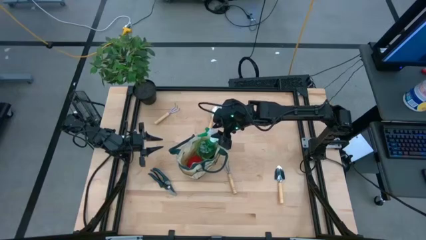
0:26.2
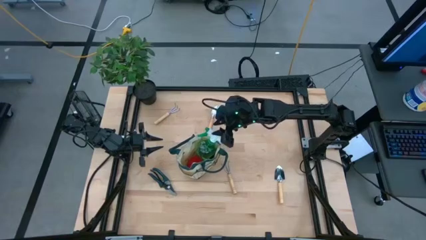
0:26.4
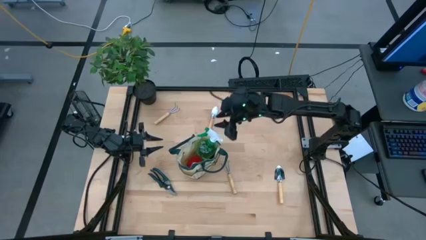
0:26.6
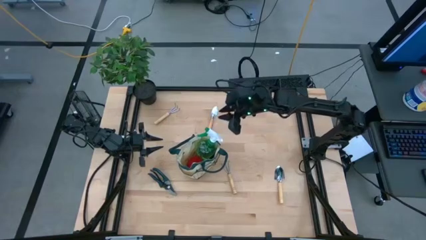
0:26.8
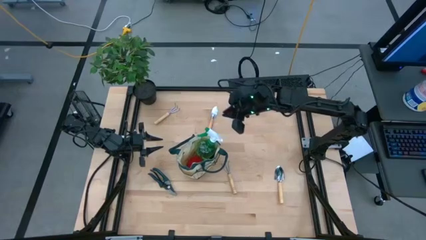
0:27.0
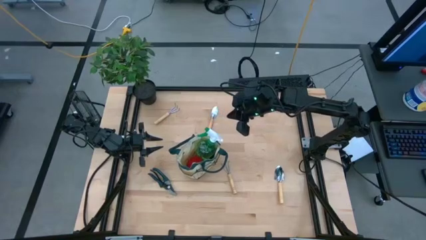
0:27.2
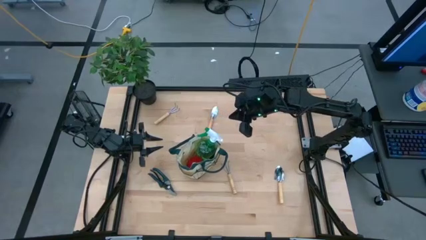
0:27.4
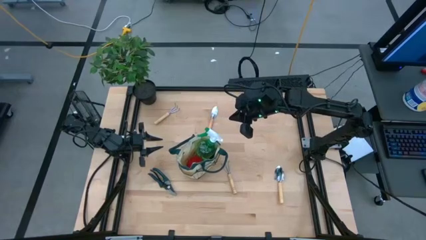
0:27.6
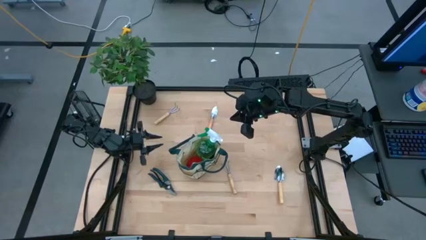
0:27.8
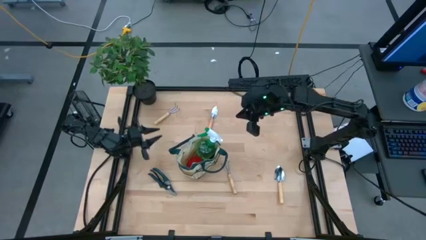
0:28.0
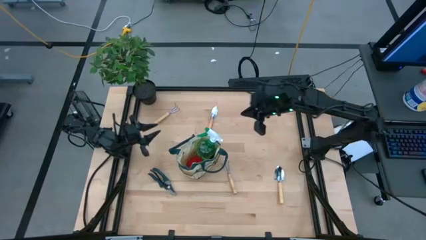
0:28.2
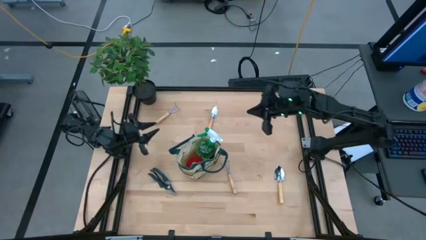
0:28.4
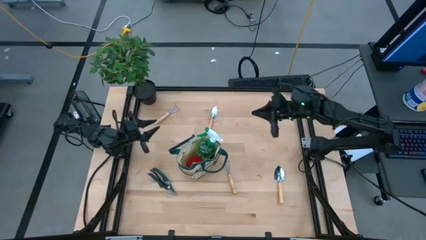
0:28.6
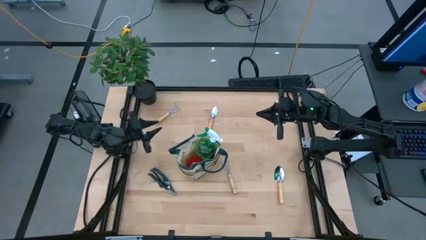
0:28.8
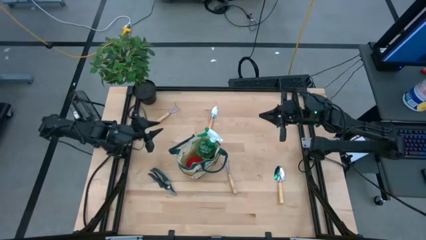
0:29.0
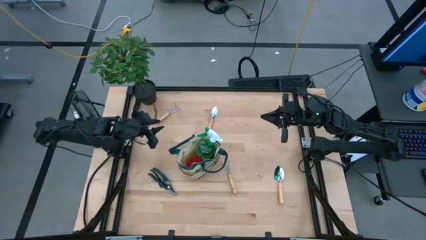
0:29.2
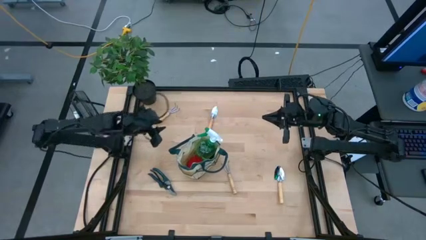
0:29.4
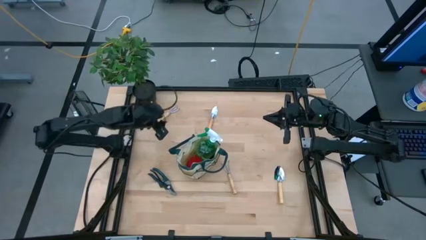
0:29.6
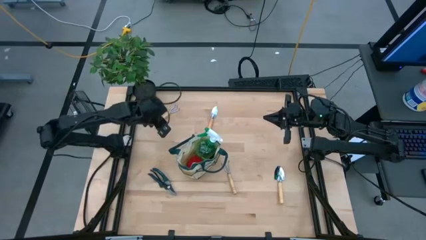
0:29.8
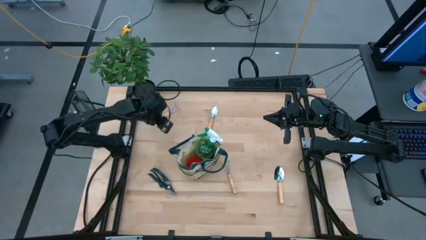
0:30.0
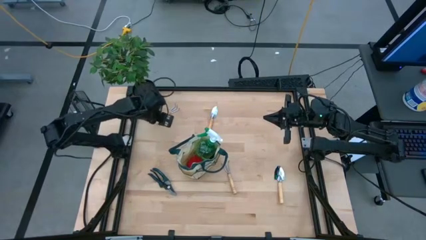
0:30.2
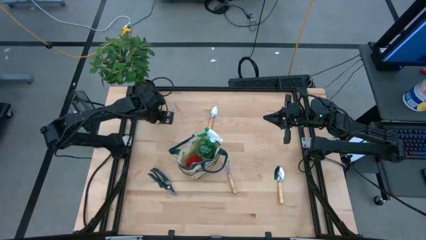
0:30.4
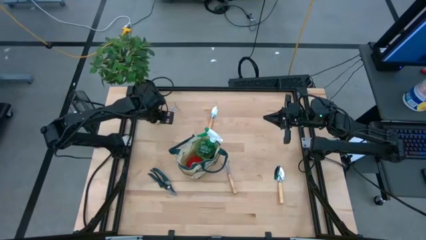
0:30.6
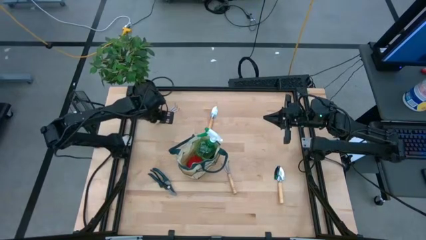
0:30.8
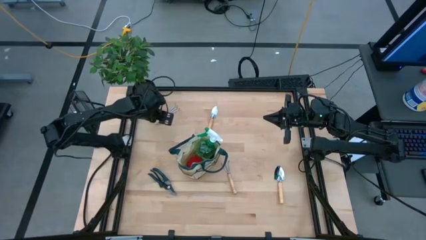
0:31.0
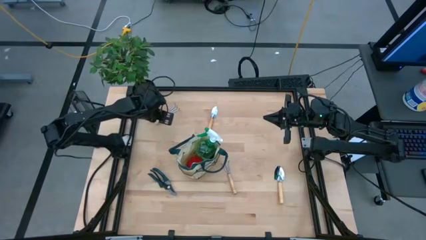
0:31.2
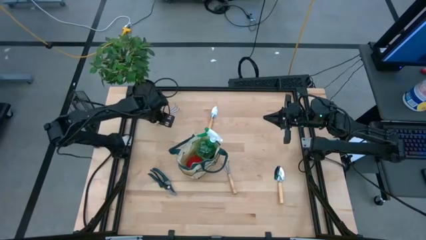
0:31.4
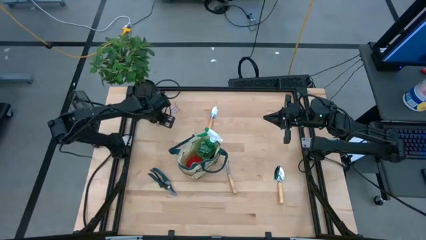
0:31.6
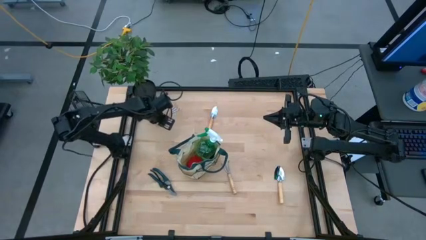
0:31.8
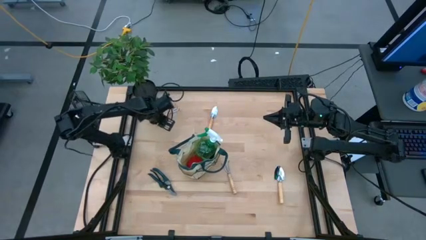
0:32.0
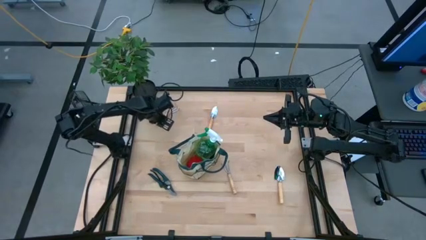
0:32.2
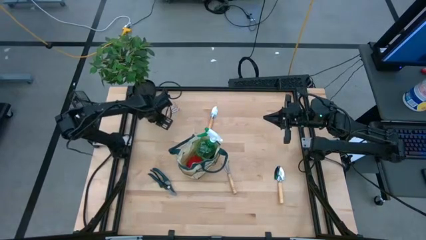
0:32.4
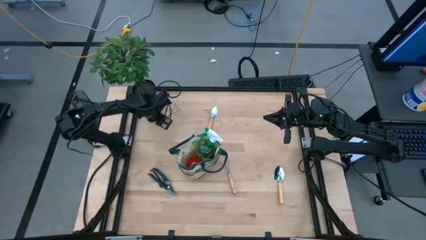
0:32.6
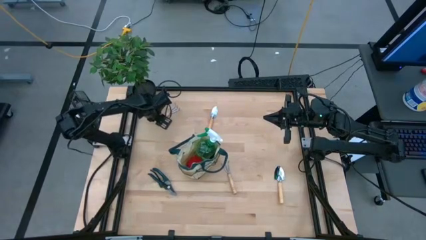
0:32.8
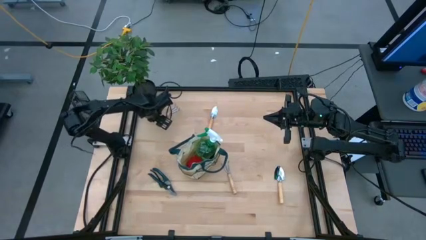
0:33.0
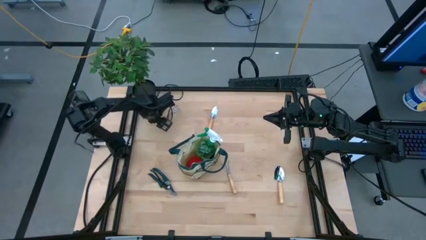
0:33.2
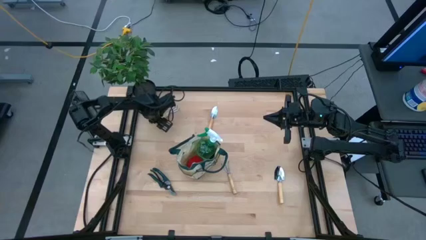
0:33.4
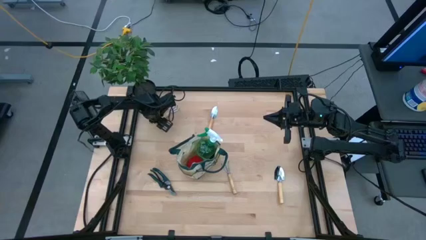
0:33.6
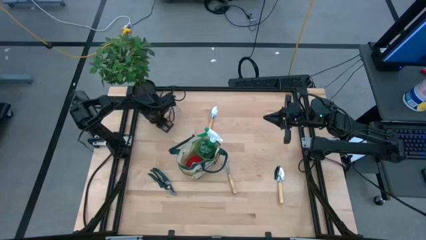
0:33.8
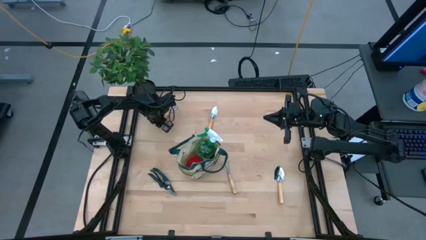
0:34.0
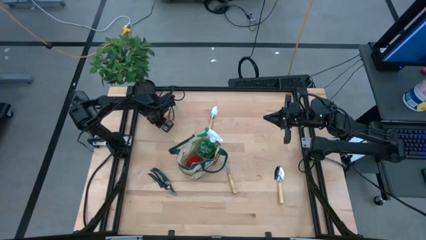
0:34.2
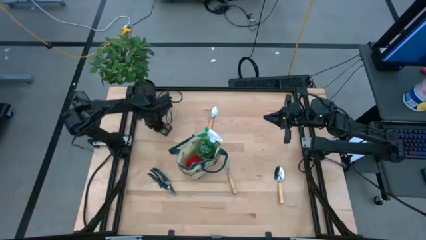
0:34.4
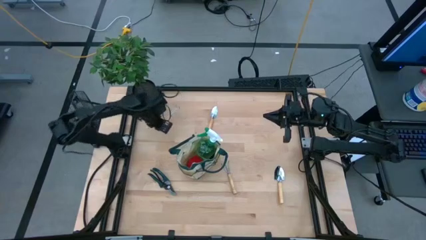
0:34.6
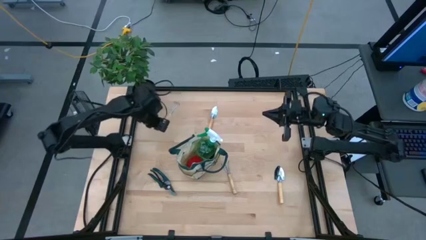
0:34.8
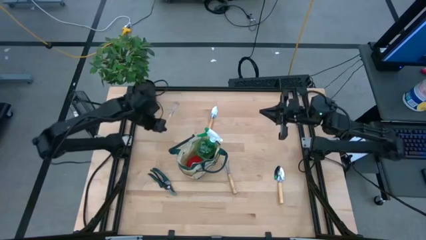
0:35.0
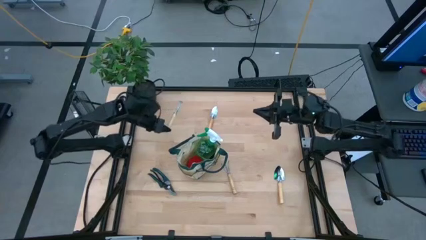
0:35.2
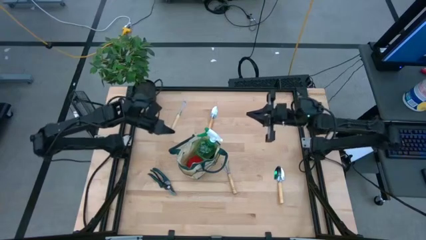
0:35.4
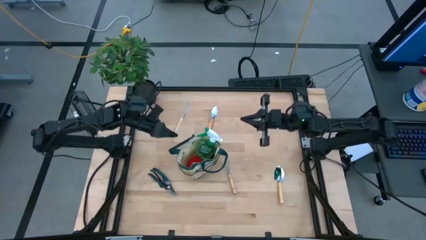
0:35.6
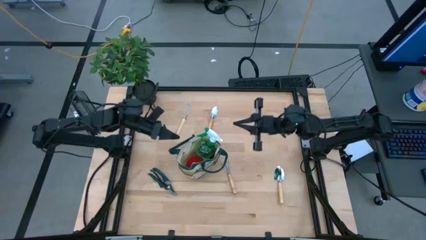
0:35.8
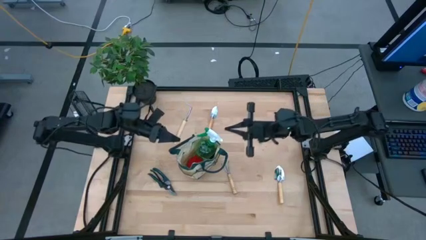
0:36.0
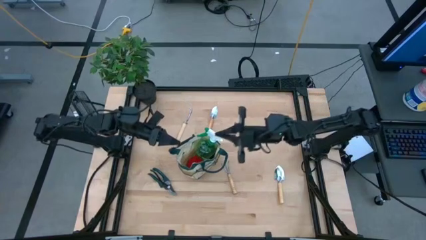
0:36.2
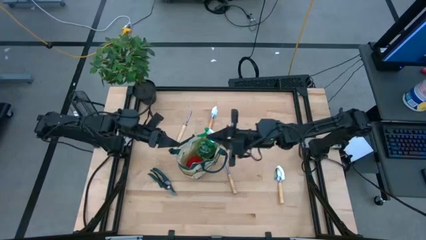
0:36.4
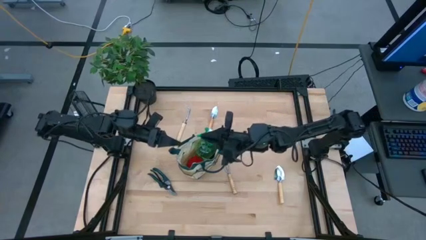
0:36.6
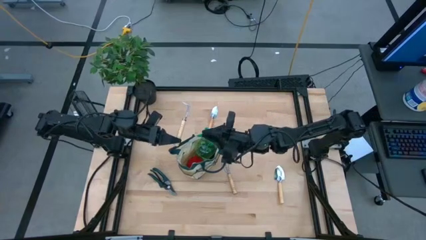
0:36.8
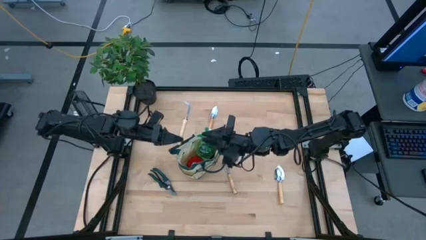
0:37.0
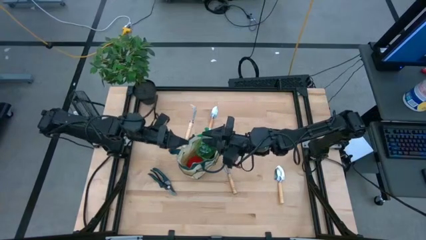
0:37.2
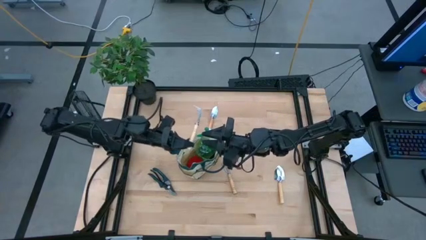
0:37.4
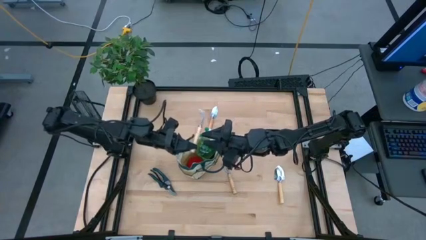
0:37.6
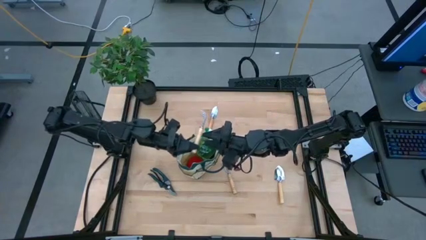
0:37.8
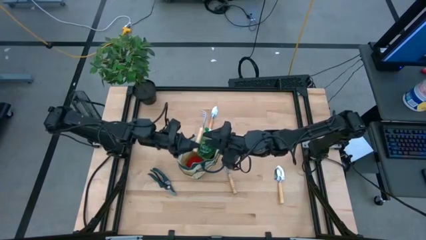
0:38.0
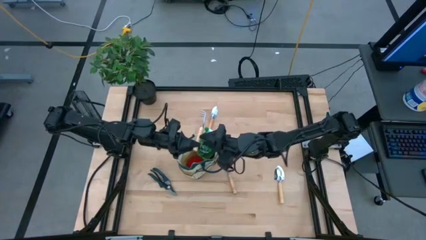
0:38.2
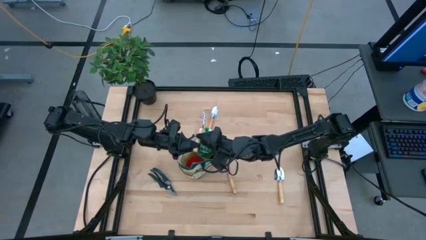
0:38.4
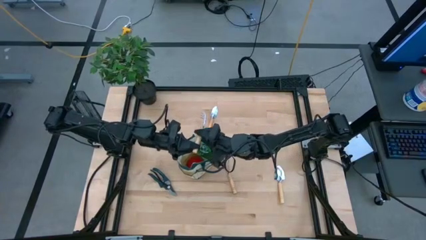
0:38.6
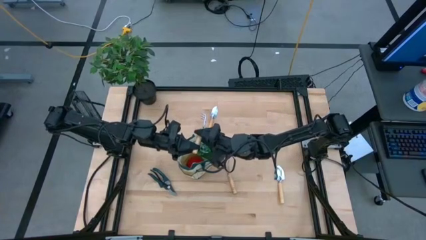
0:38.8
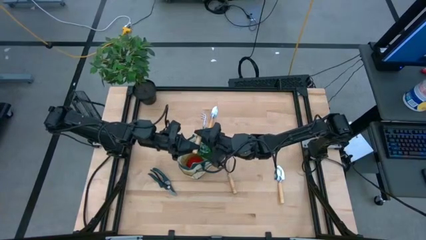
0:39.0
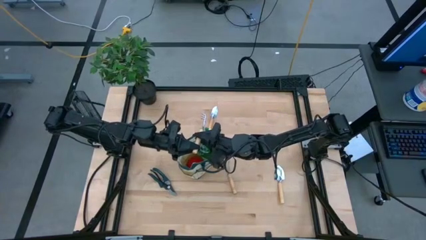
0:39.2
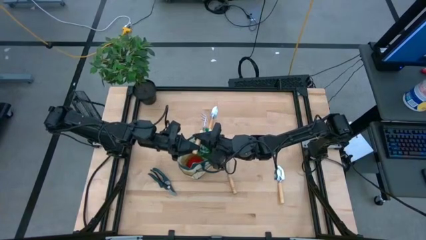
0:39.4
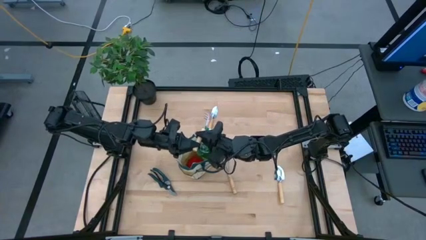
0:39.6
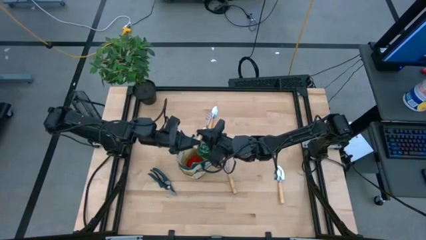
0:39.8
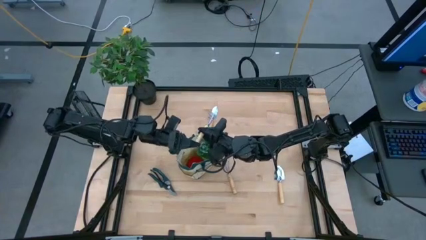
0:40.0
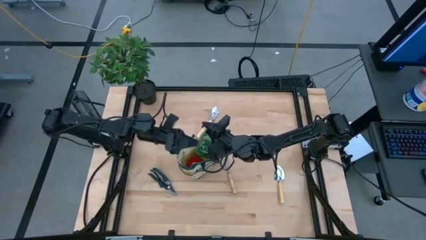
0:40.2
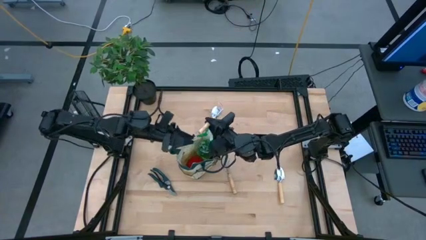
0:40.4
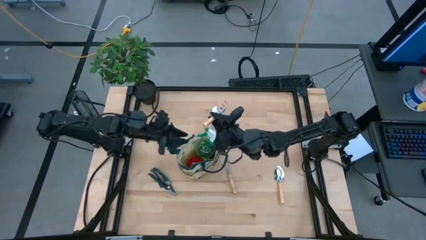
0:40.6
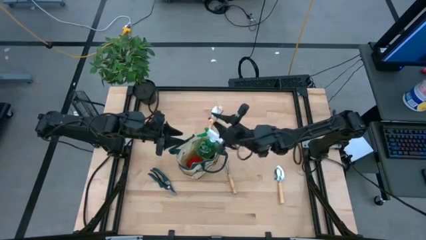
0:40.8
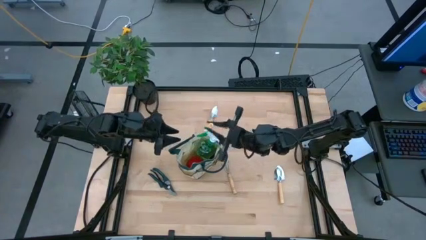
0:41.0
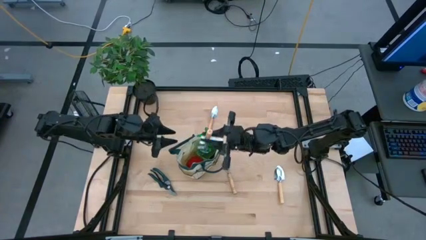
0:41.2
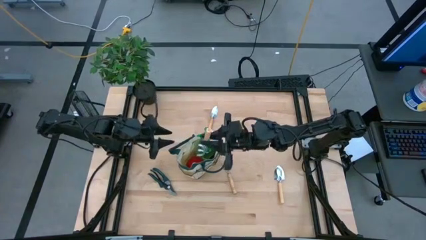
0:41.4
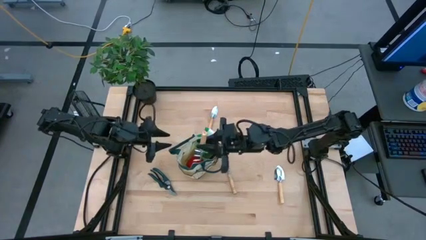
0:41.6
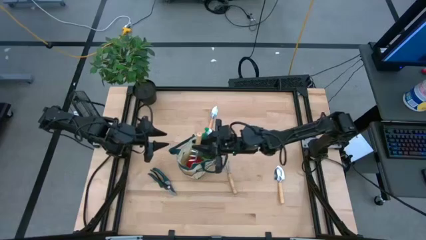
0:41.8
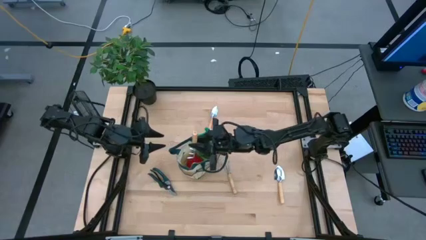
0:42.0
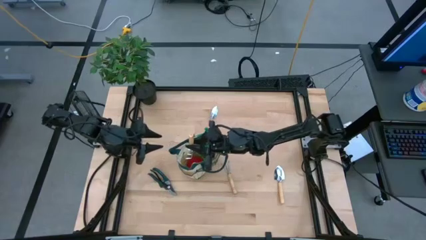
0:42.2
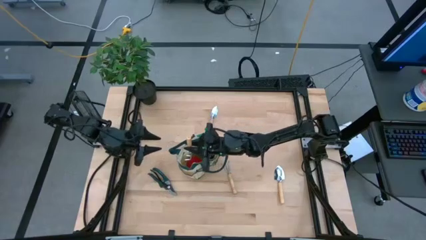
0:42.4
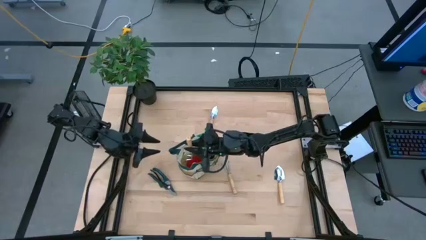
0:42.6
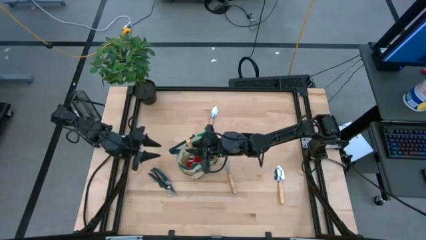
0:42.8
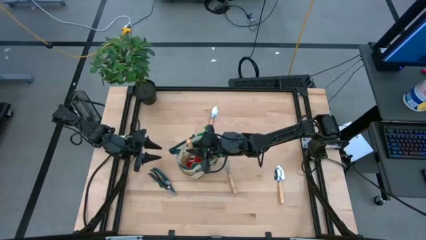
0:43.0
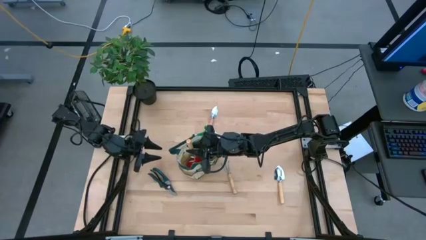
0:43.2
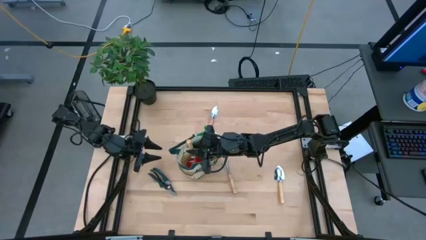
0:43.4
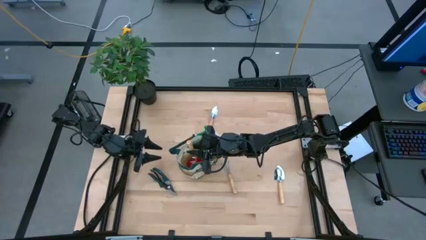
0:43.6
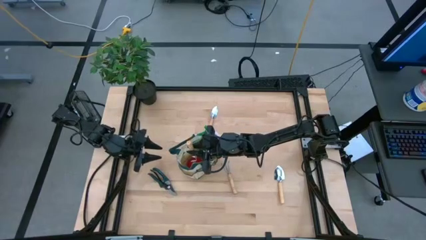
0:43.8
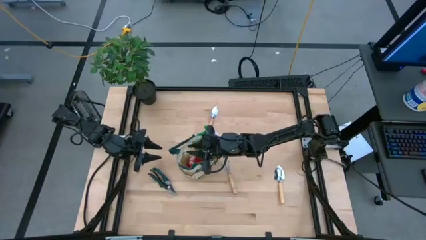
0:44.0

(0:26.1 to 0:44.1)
Task: Pick & Place Garden tools in Gardening bag
Put the brown hand rake into the brown bag
